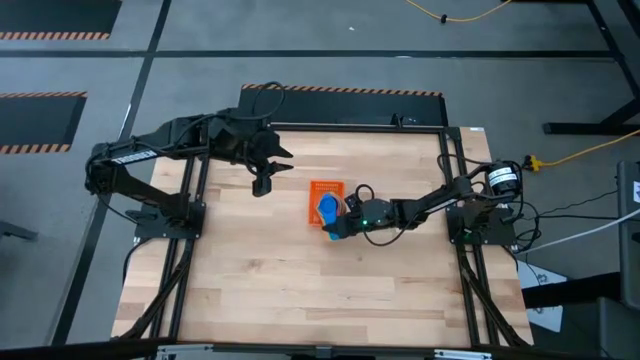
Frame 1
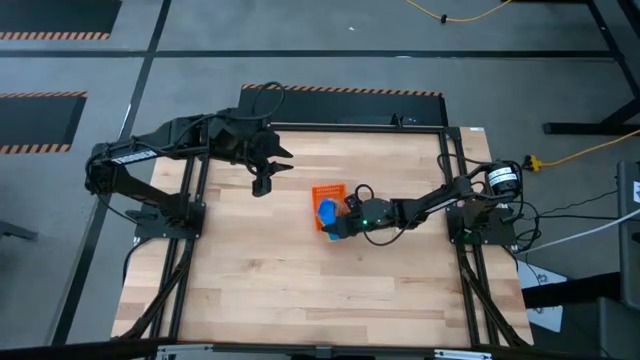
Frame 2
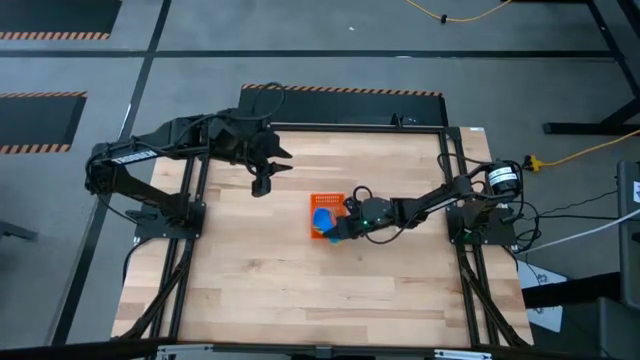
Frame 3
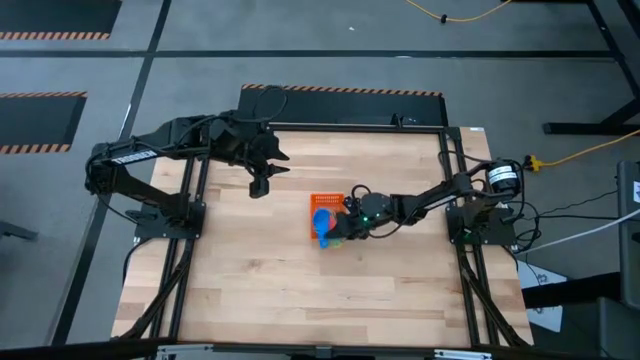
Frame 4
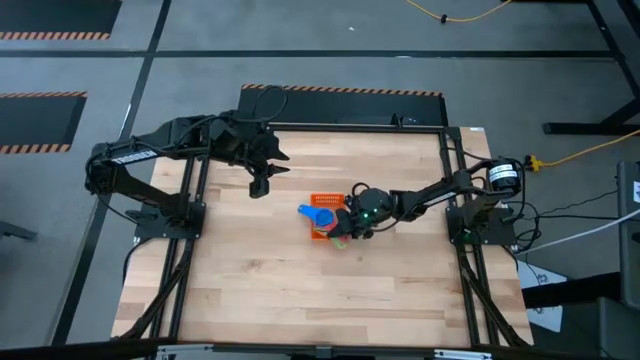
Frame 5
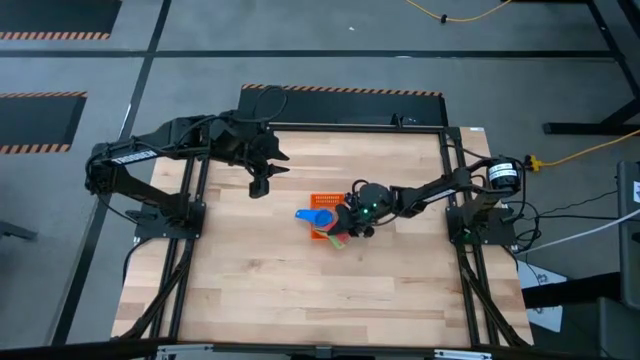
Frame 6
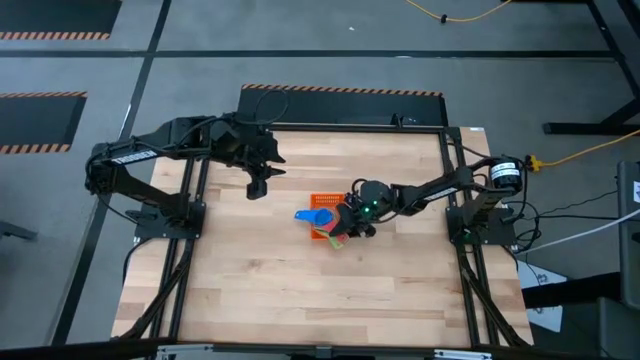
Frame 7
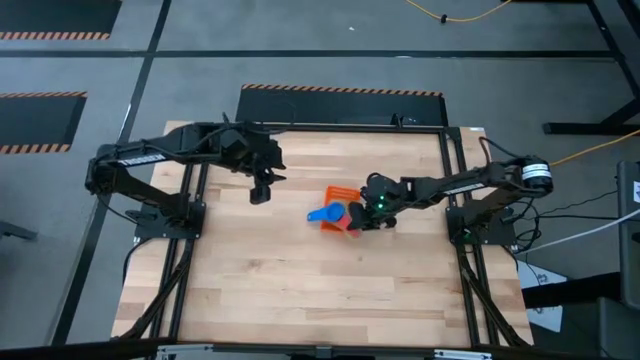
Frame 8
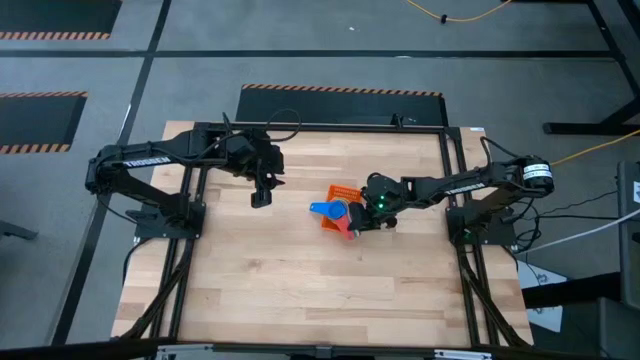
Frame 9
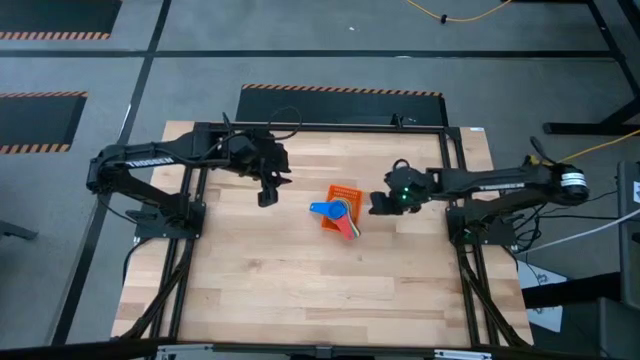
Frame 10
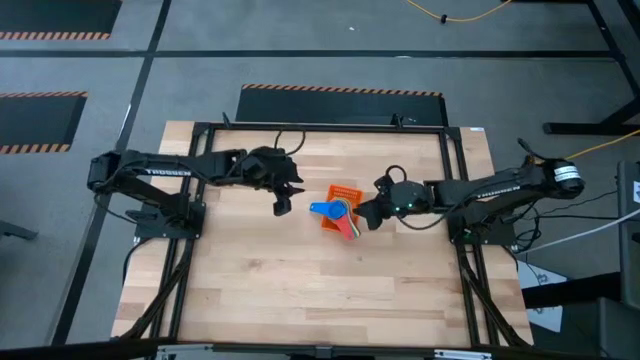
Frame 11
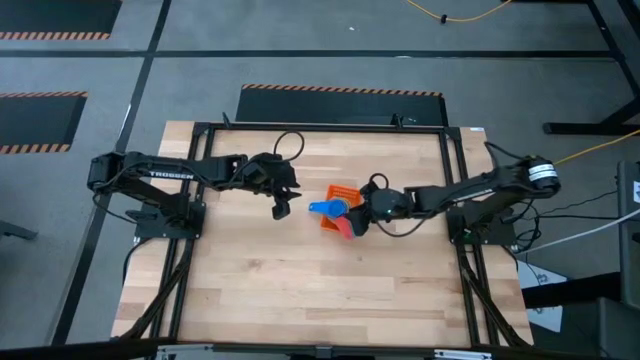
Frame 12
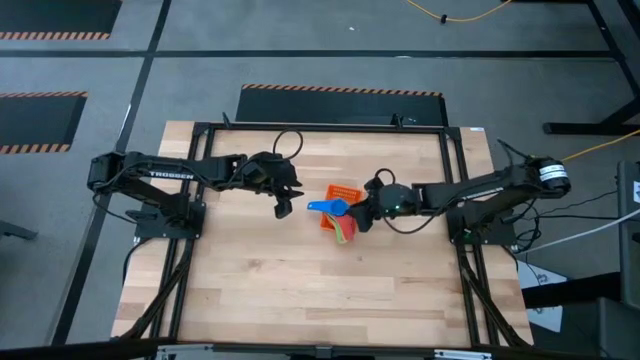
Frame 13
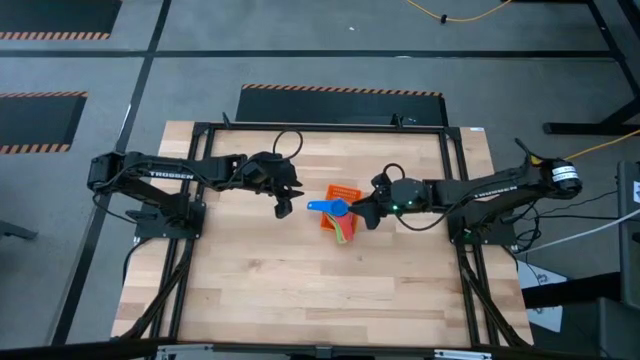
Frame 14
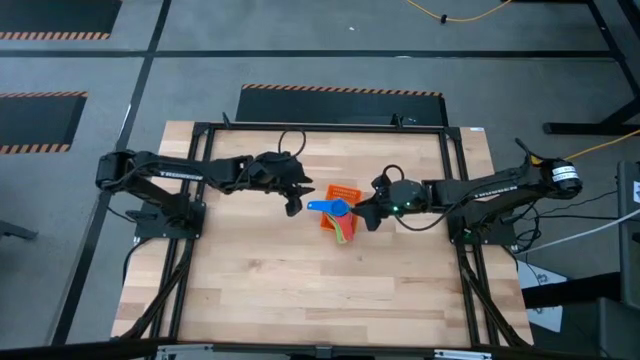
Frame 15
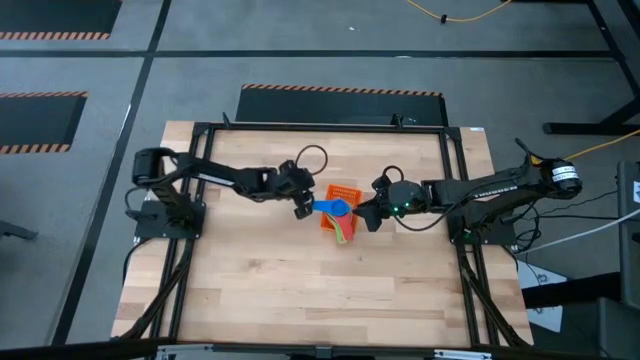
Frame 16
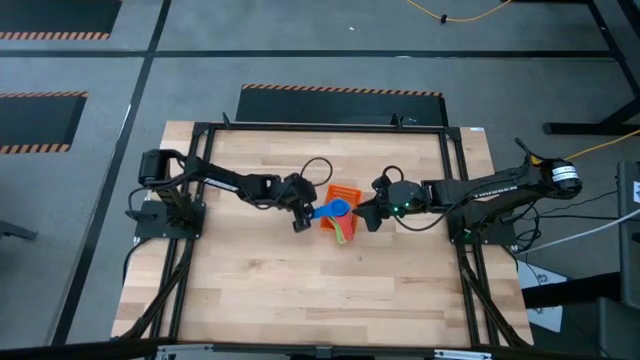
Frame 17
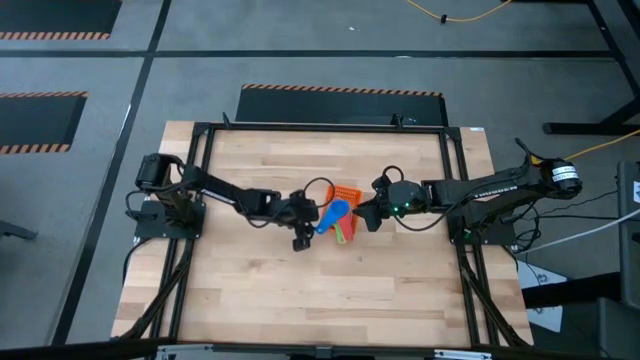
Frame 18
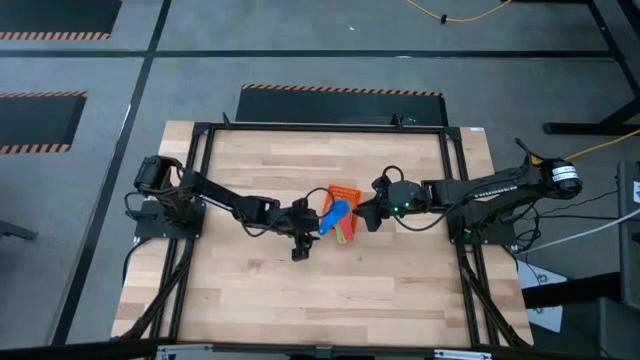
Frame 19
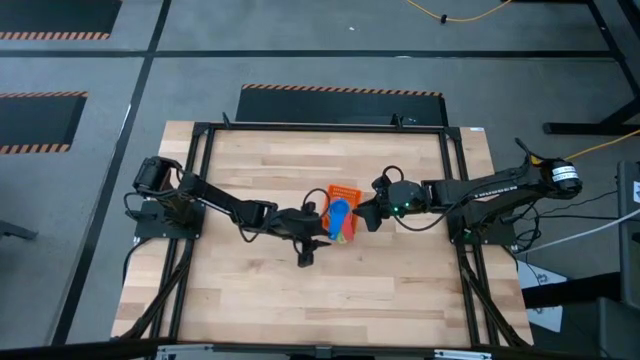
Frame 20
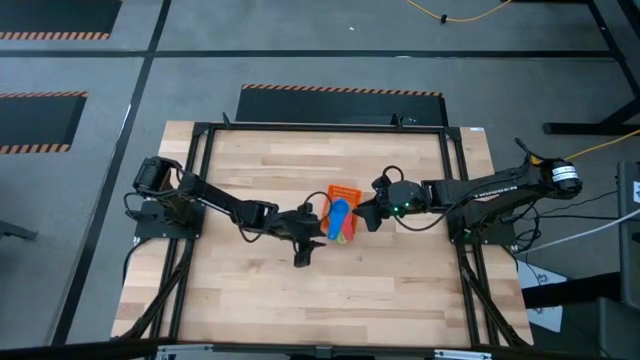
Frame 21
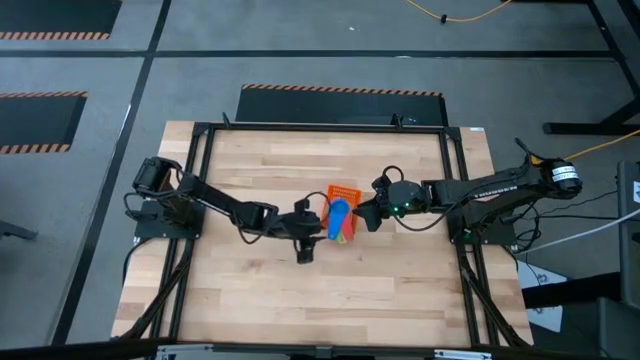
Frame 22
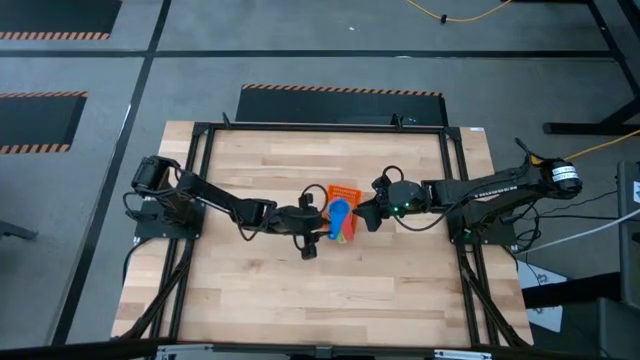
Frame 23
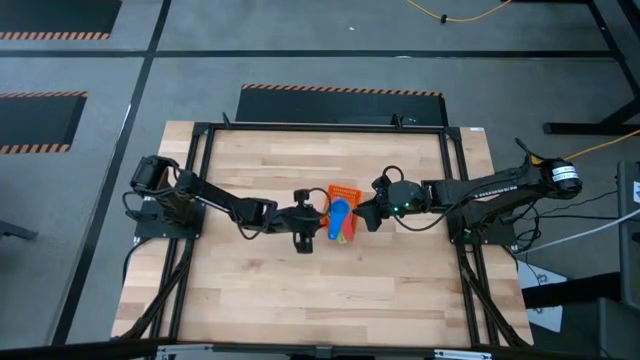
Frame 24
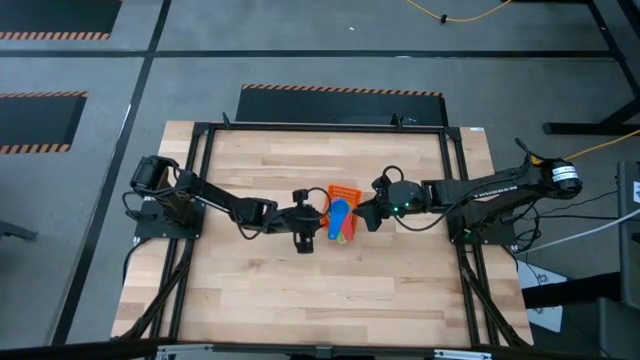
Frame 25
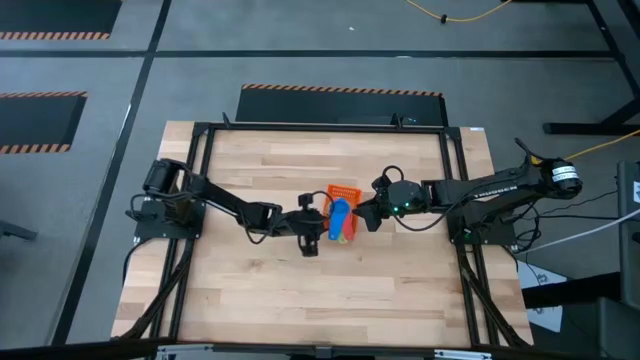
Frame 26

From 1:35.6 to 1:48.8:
Task: Nest measuring cups in basket
Put the nested measuring cups into the orange bin

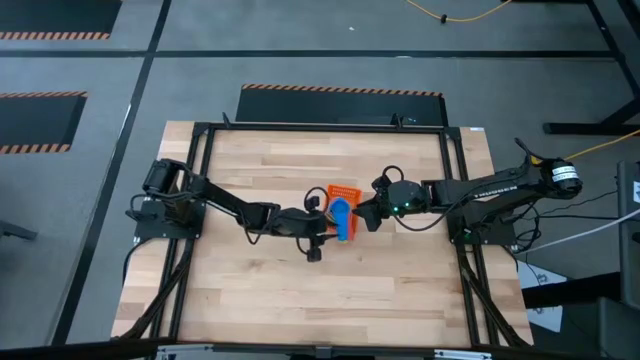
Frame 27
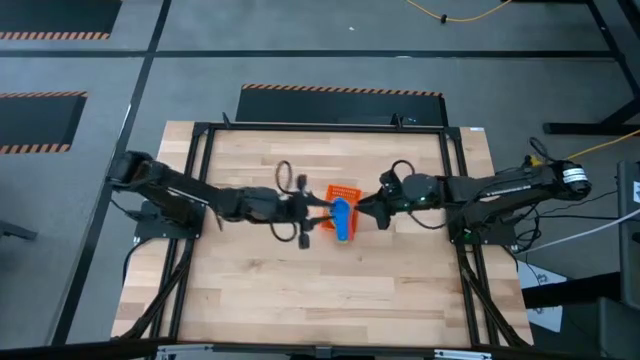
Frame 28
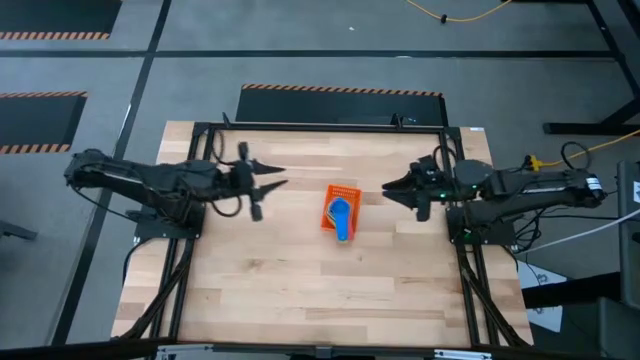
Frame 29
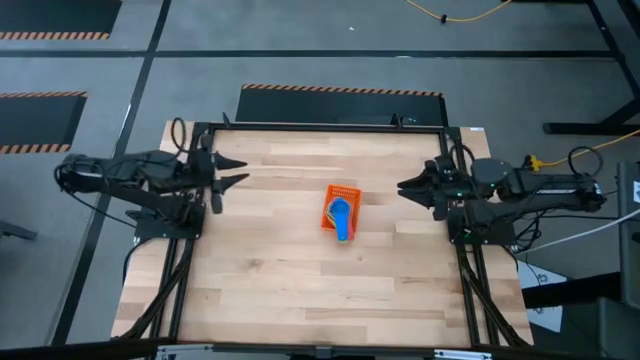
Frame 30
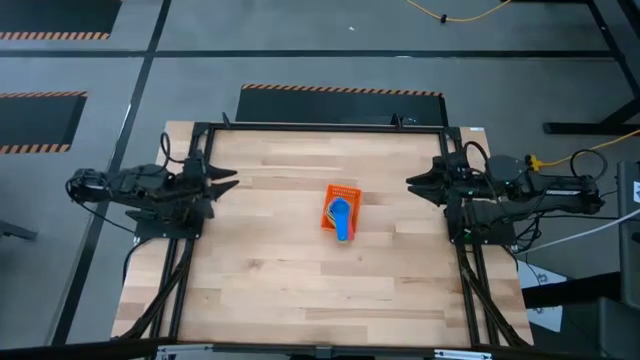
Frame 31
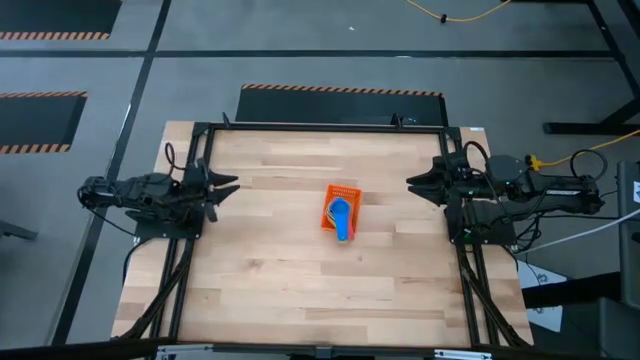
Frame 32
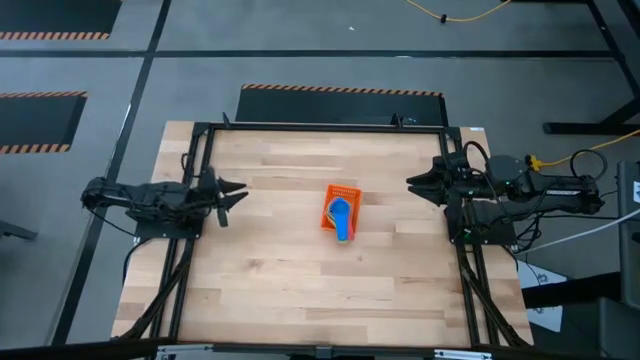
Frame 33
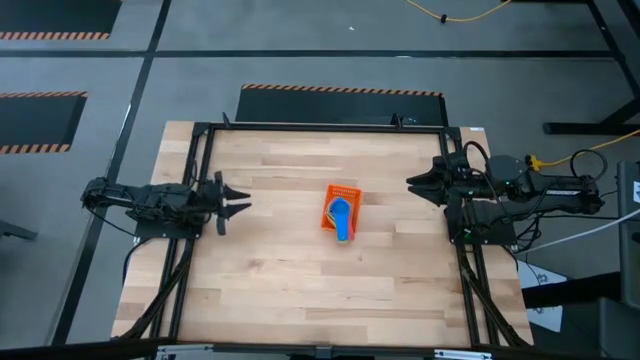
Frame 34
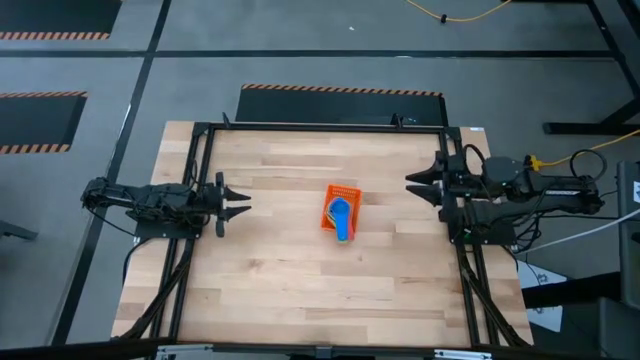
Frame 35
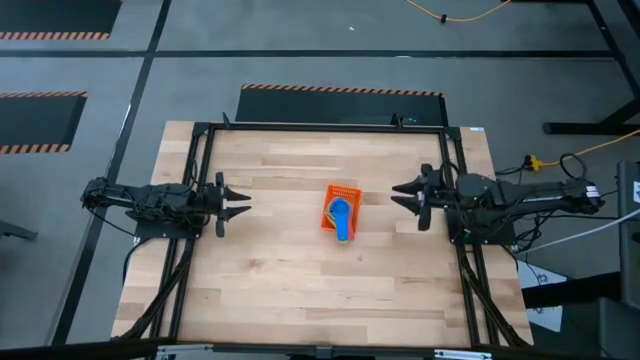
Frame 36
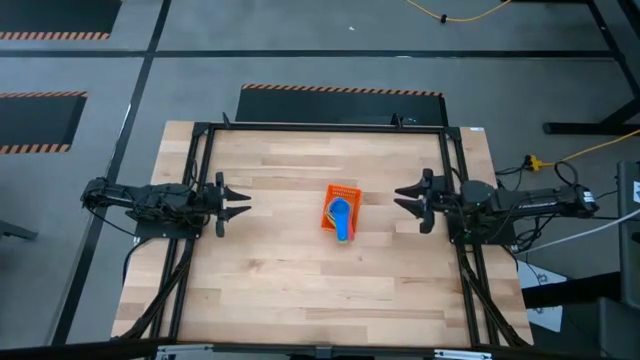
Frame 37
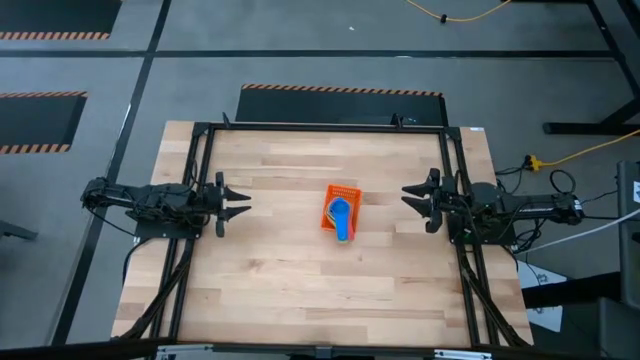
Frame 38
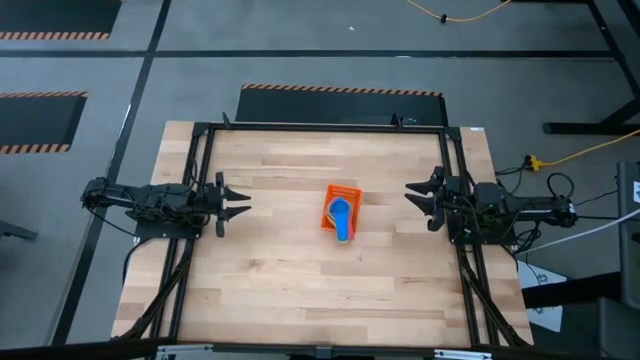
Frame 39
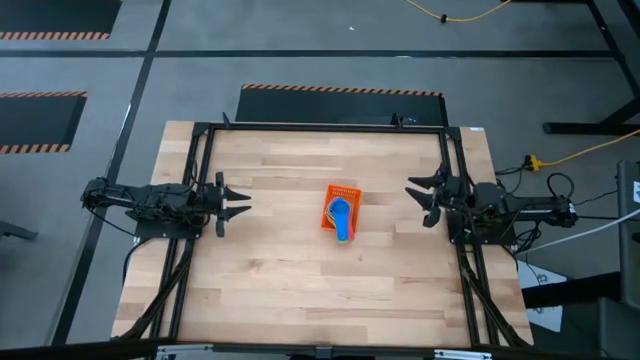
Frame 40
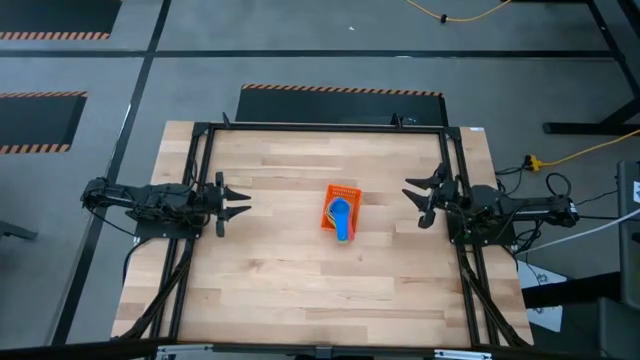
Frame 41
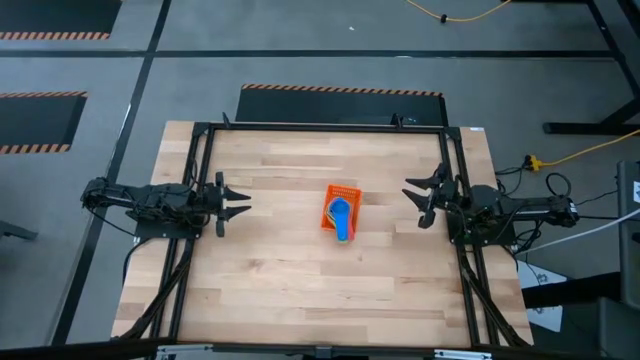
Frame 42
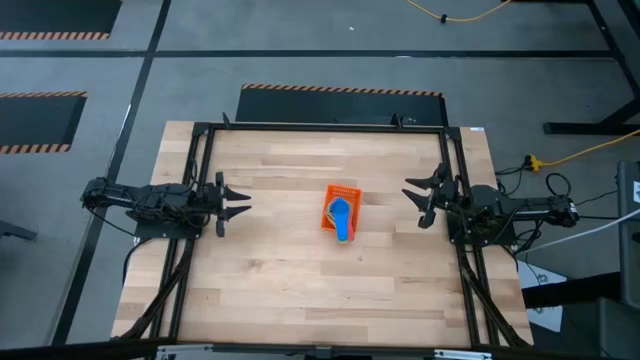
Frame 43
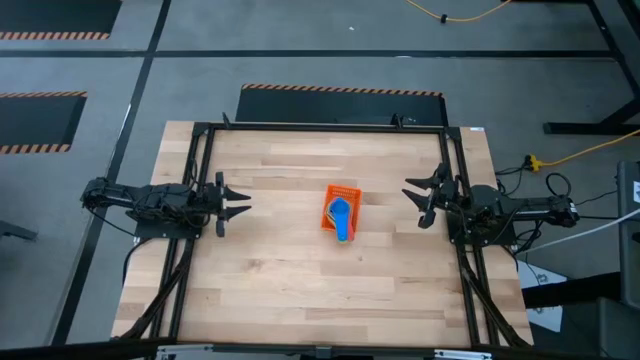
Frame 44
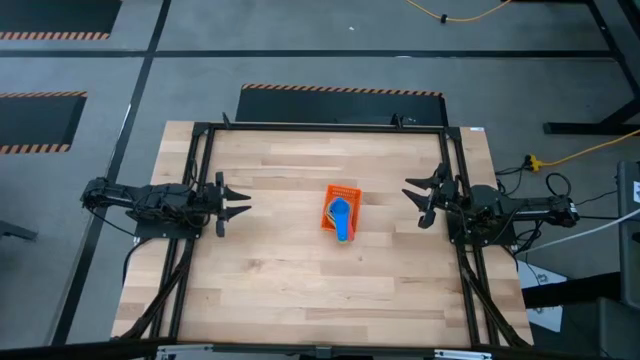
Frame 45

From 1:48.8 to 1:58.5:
Return to Home Position
